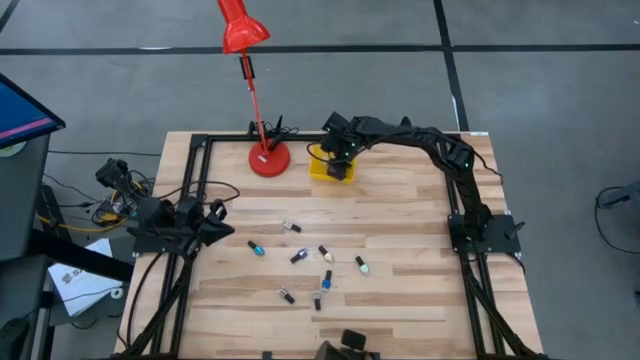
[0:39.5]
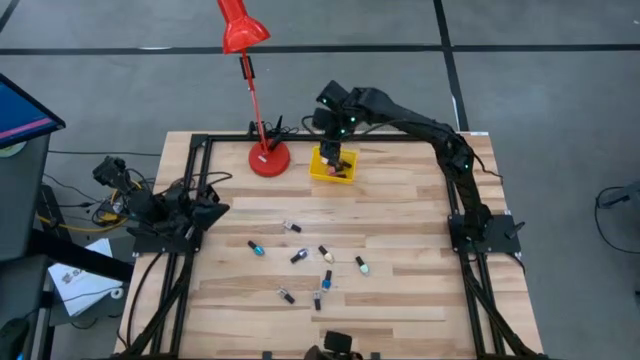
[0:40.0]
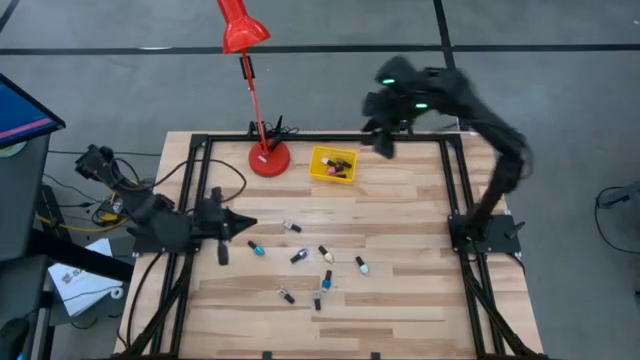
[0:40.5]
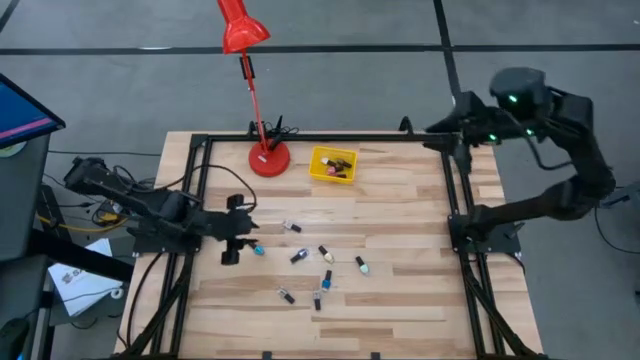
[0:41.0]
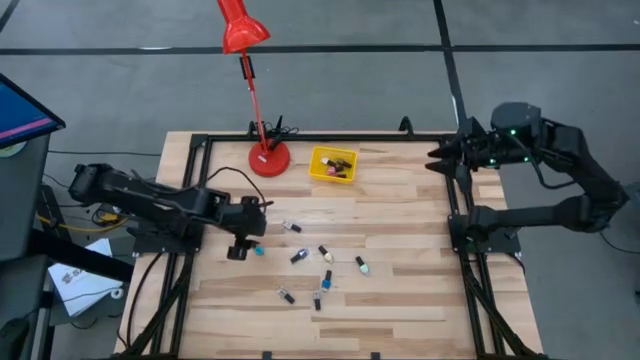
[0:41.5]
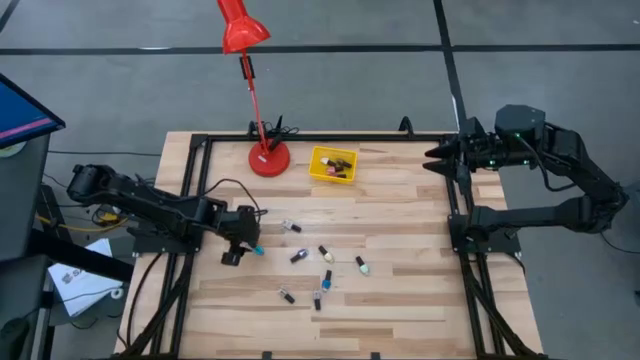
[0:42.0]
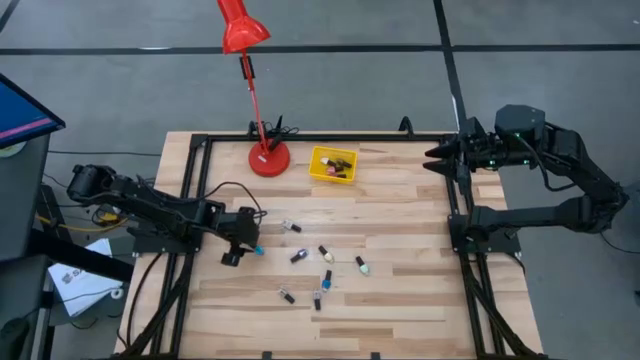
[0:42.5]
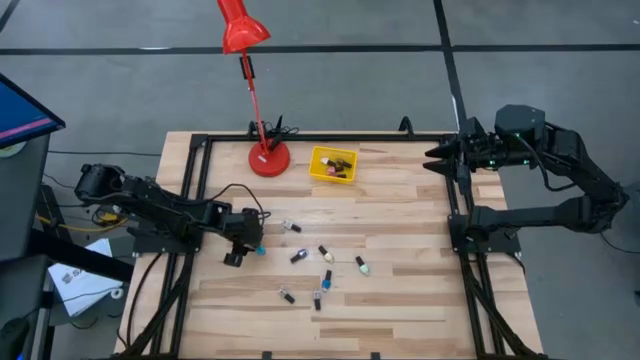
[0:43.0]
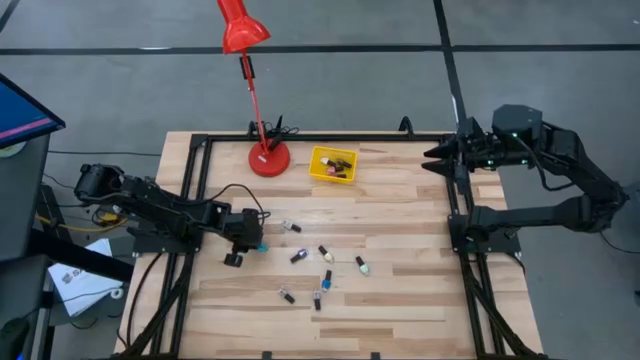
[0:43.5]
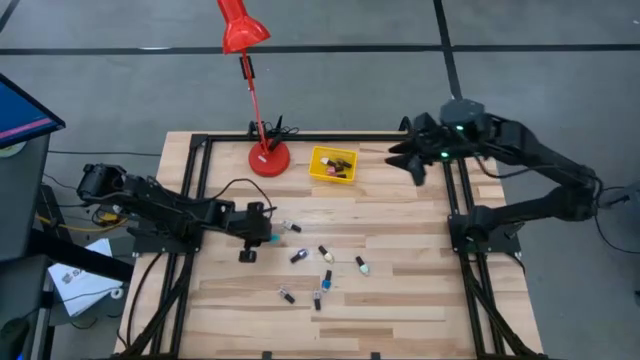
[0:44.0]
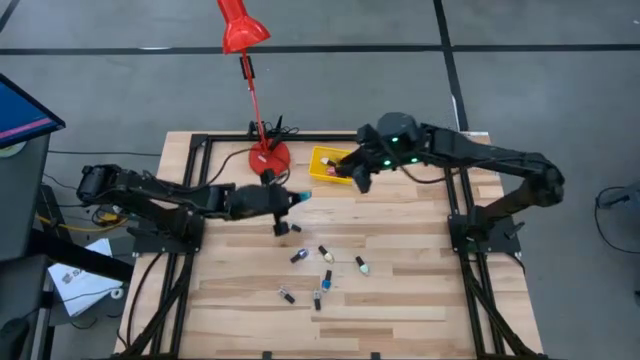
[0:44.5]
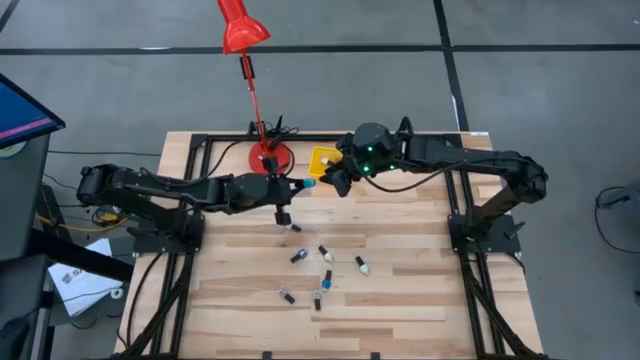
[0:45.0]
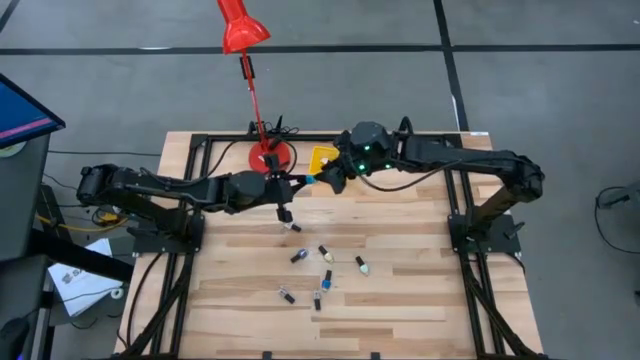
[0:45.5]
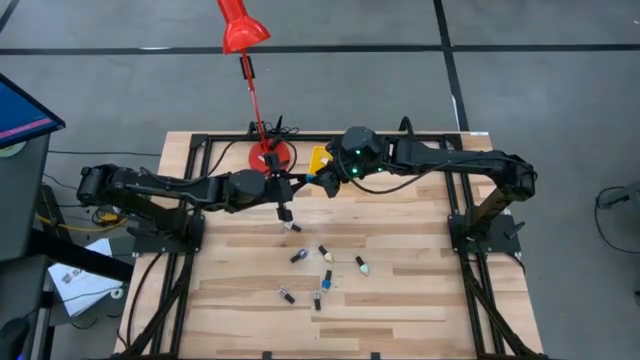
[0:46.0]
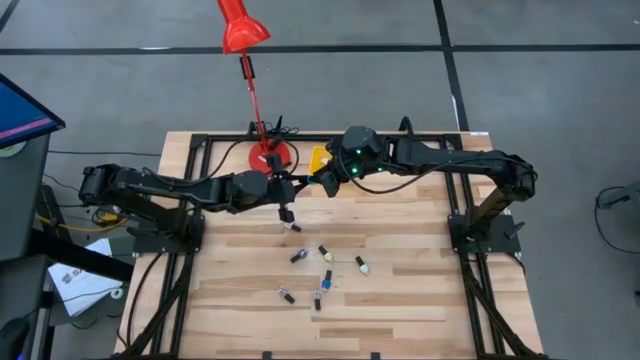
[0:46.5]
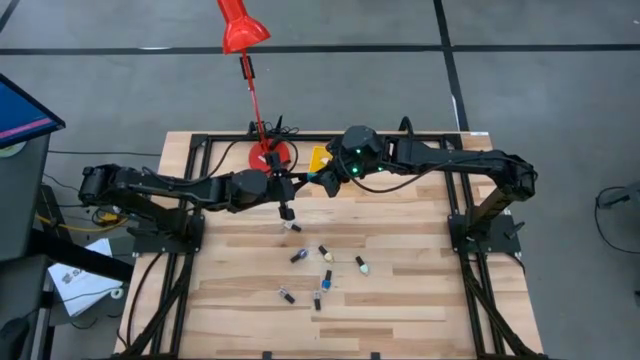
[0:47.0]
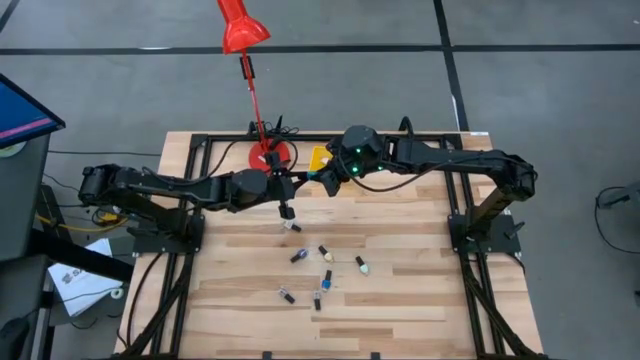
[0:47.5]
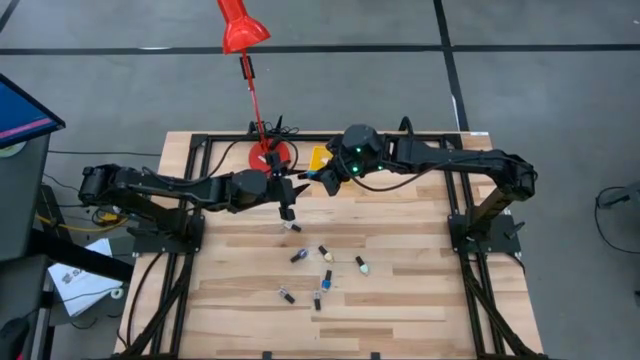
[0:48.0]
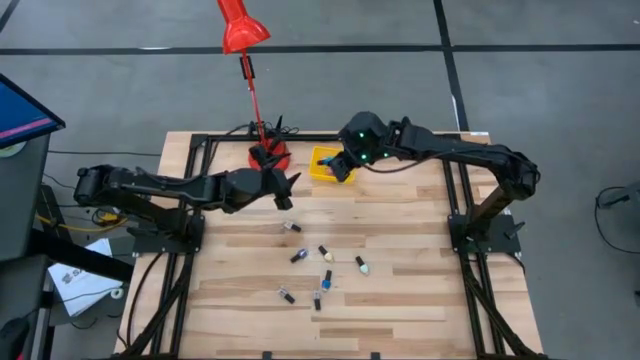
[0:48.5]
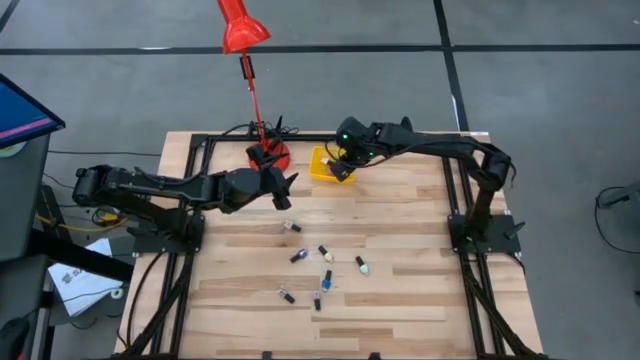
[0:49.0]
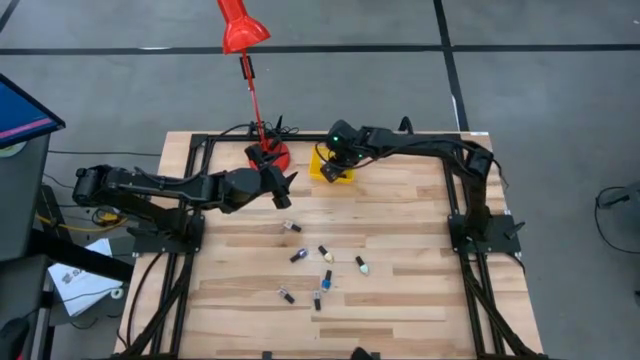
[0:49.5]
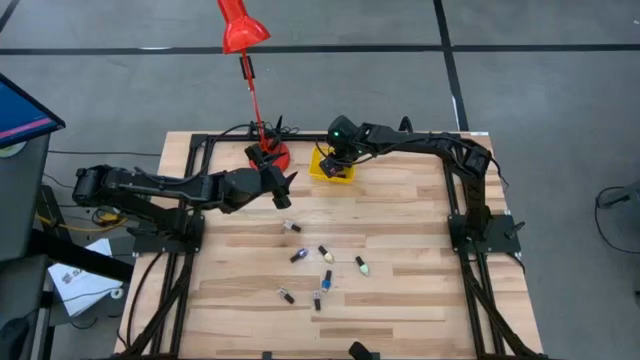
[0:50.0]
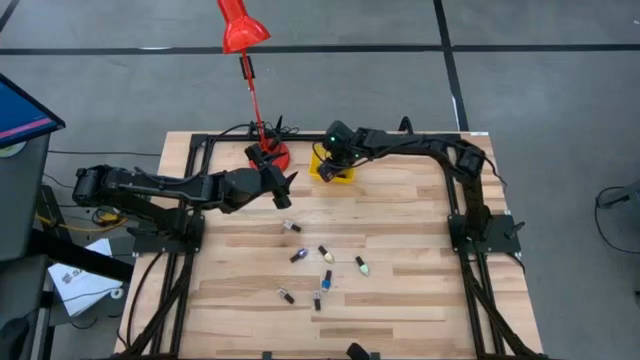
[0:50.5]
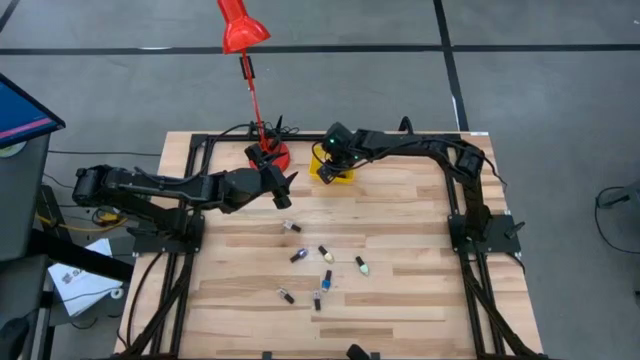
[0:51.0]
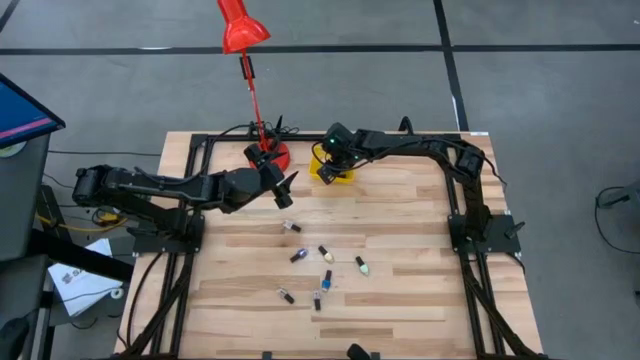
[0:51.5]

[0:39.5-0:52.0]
Task: Pick & Place Nail Polish
Put the blue nail polish bottle into the yellow bin

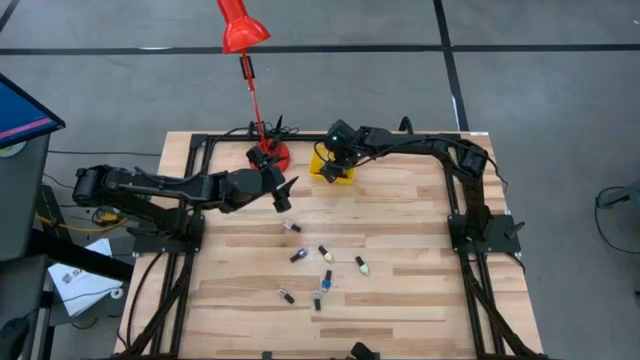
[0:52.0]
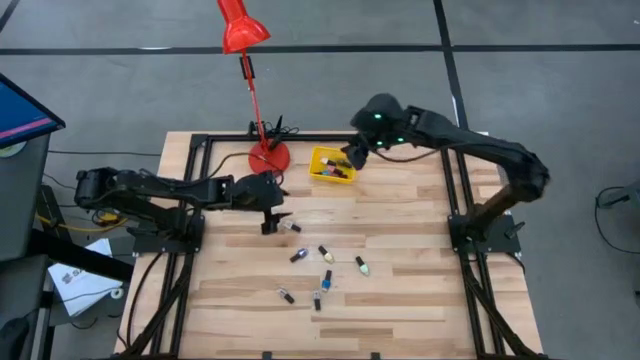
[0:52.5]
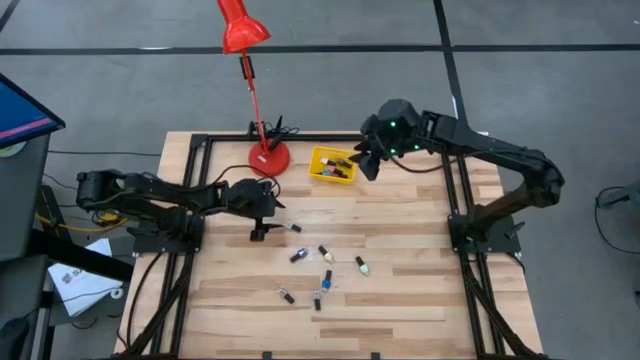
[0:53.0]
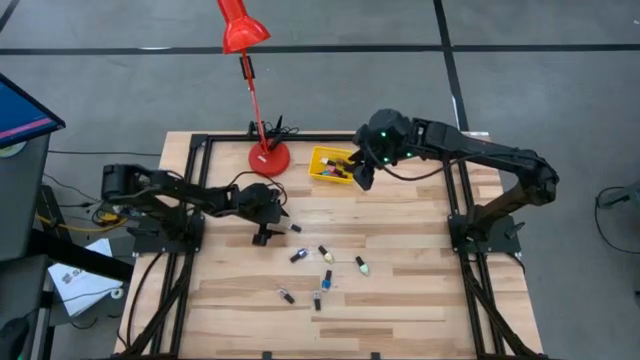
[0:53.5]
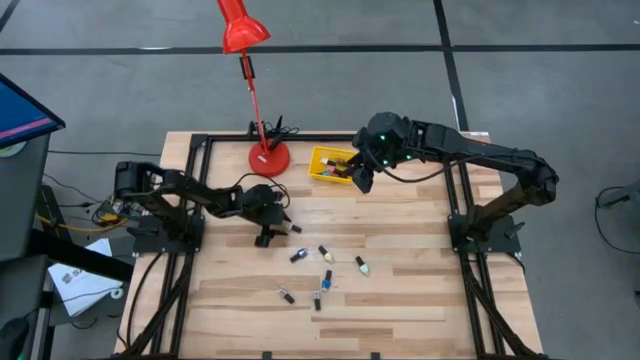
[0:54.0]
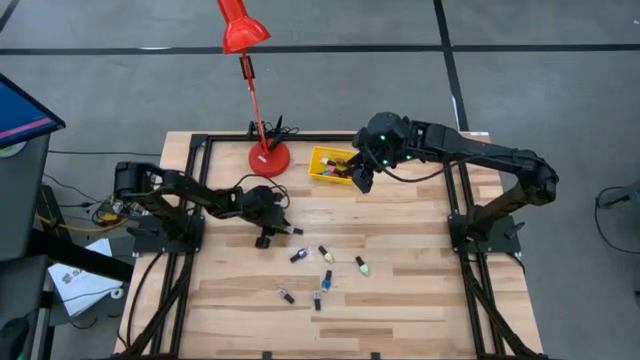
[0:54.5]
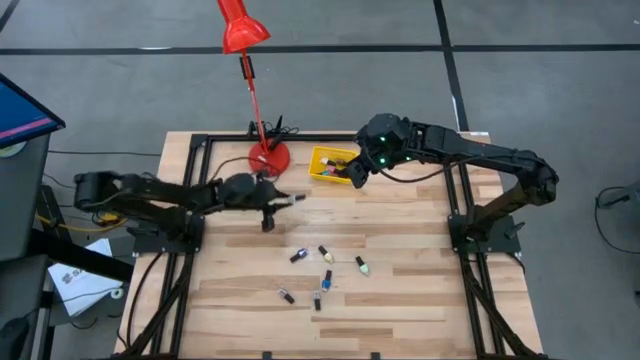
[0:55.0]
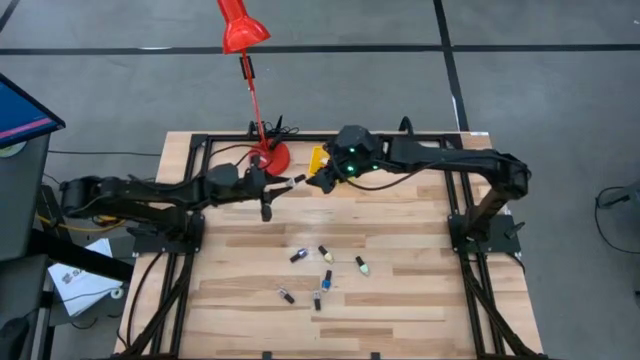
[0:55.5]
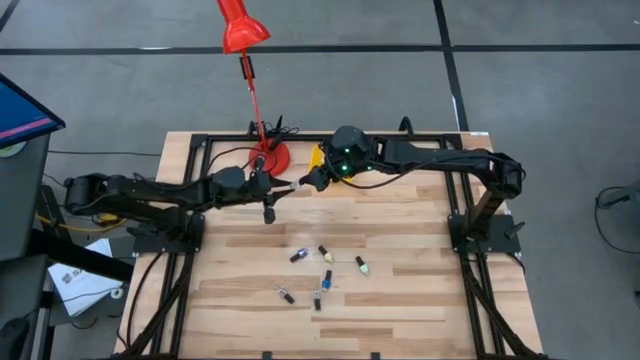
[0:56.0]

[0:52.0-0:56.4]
Put the top white nail polish bottle into the yellow bin

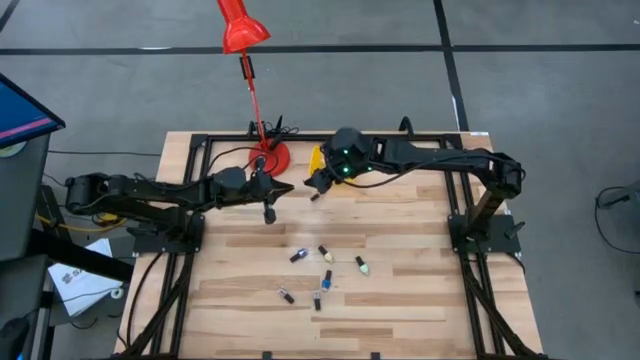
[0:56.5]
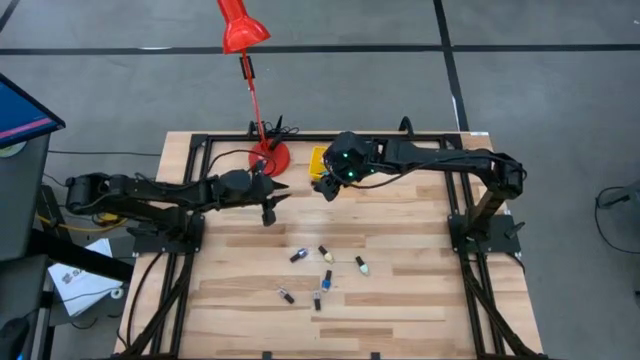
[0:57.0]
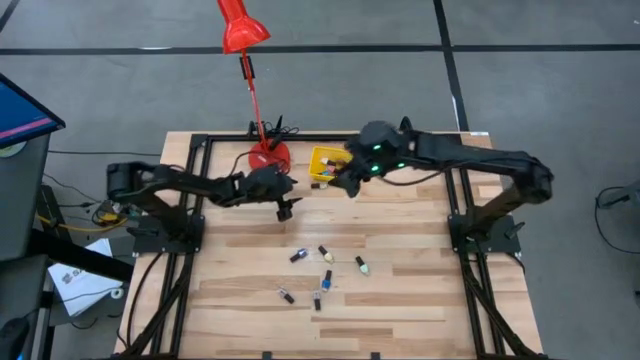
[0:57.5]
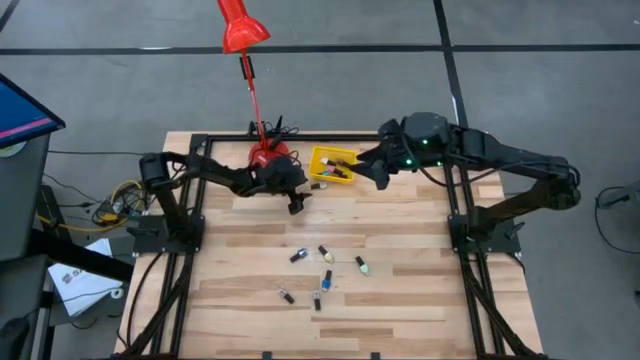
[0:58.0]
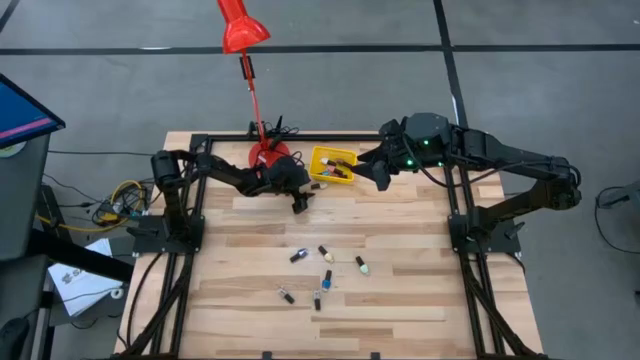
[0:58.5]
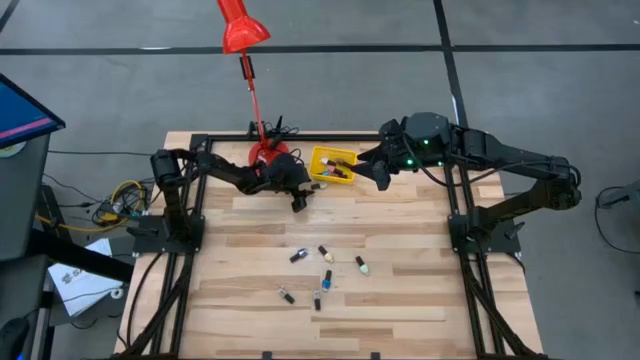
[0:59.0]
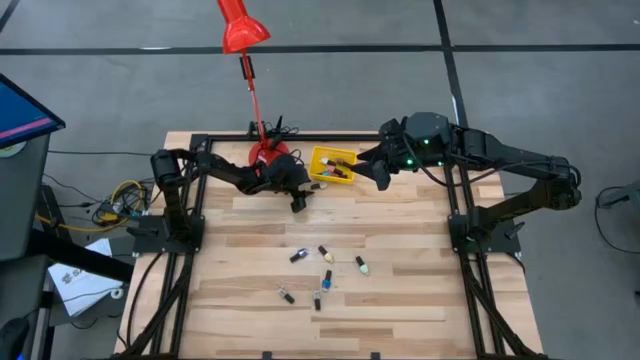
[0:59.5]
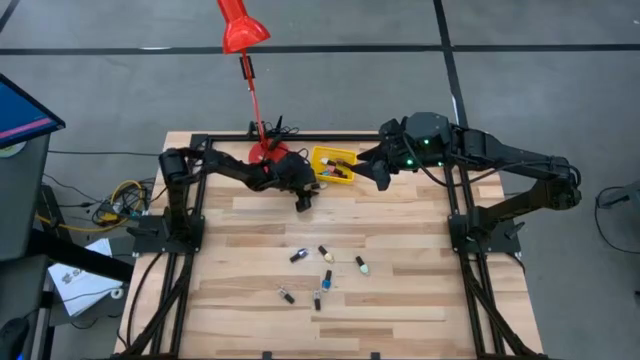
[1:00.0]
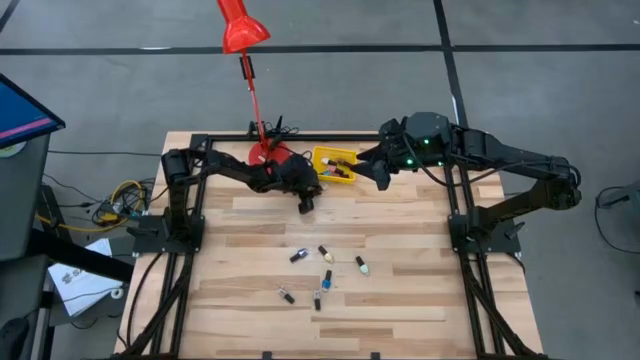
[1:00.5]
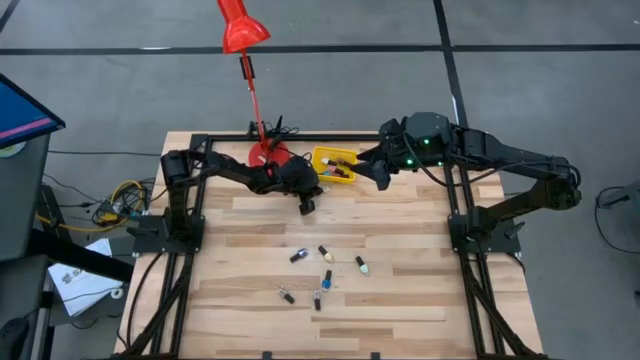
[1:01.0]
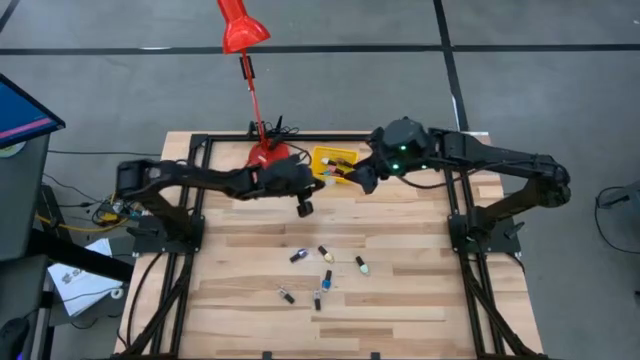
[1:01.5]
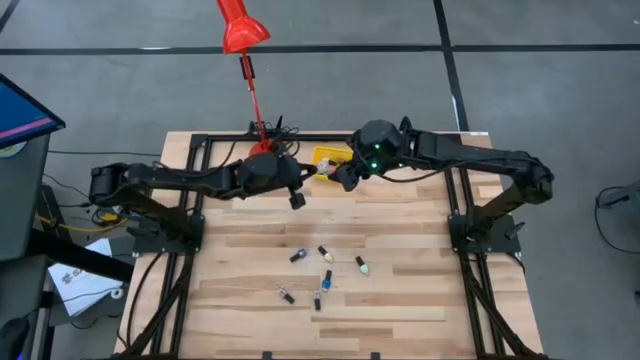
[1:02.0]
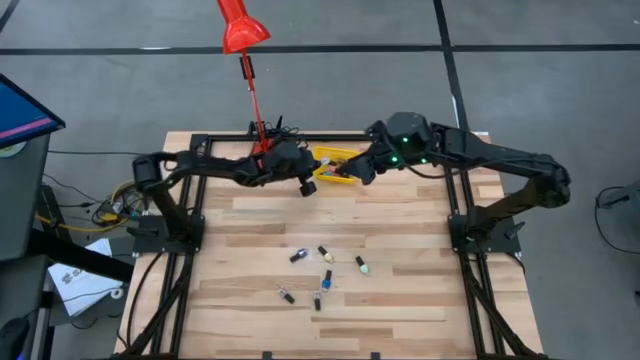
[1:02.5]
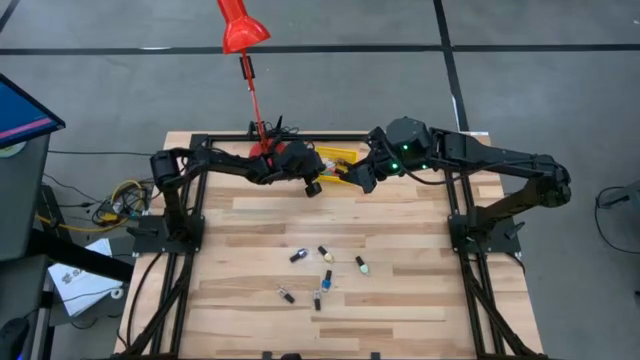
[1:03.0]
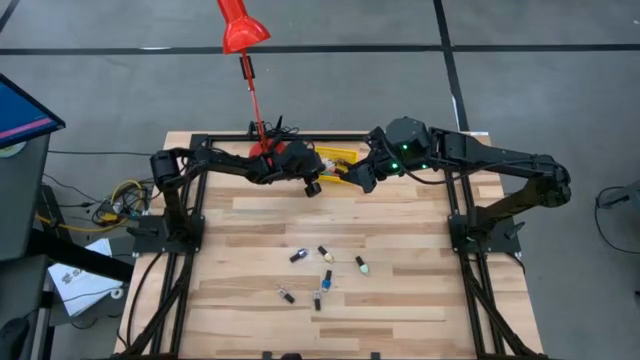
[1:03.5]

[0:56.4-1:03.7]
Put the top white nail polish bottle into the yellow bin
